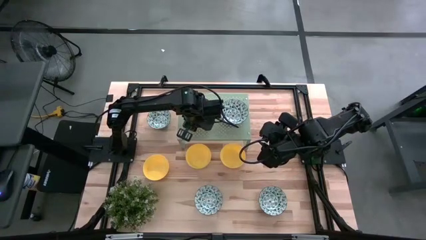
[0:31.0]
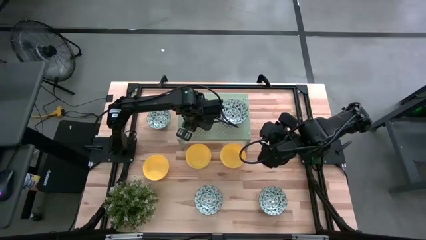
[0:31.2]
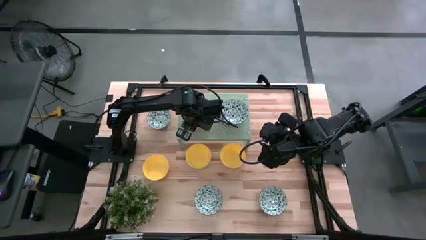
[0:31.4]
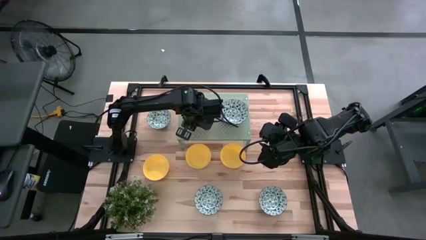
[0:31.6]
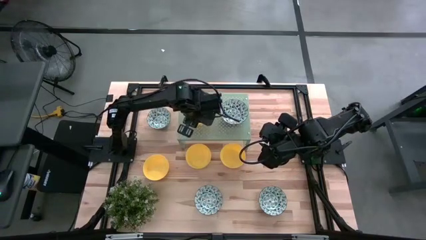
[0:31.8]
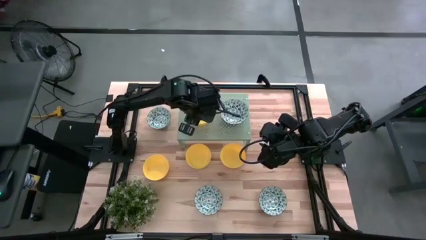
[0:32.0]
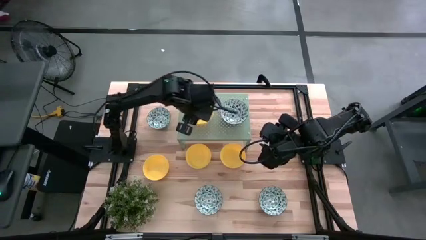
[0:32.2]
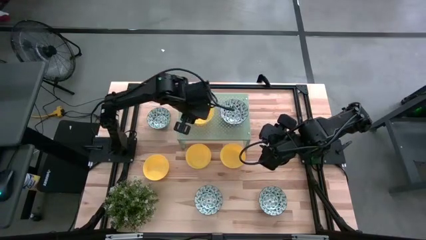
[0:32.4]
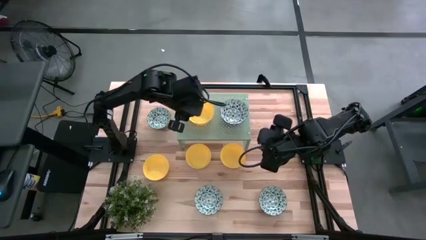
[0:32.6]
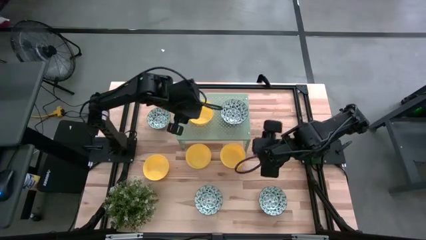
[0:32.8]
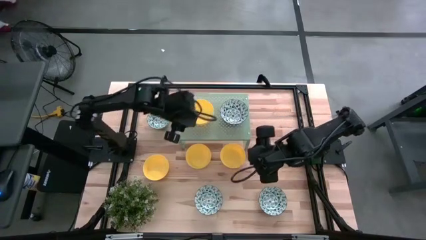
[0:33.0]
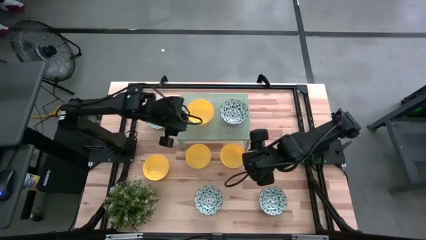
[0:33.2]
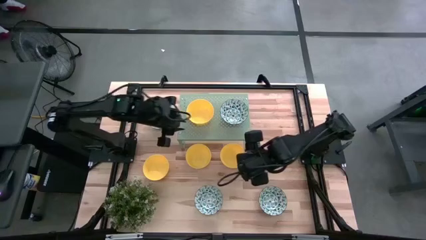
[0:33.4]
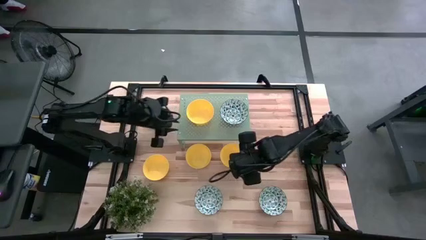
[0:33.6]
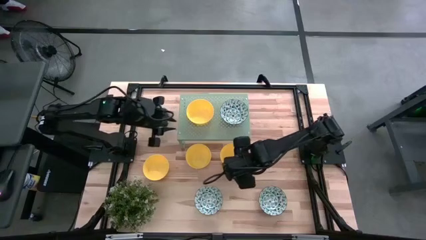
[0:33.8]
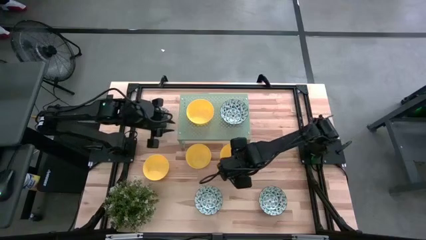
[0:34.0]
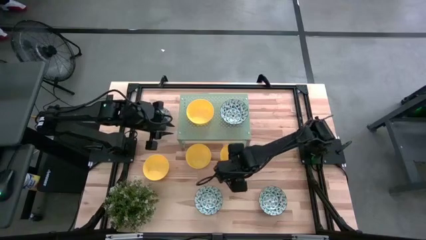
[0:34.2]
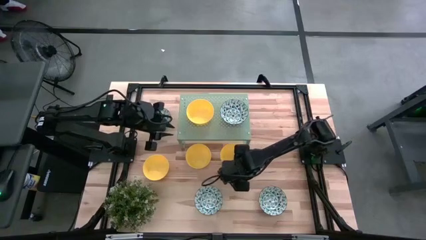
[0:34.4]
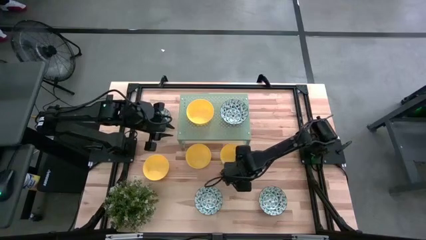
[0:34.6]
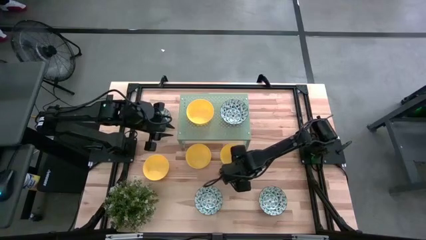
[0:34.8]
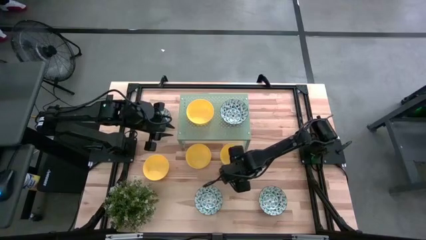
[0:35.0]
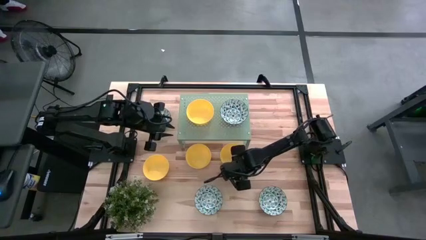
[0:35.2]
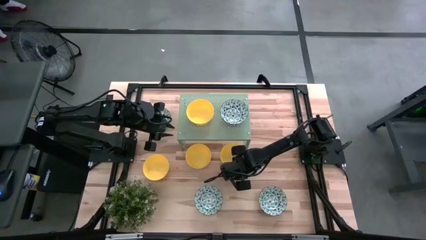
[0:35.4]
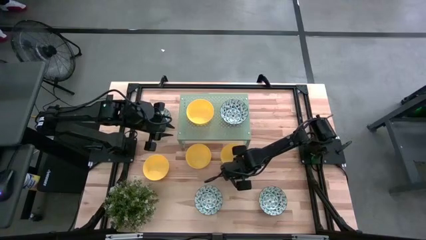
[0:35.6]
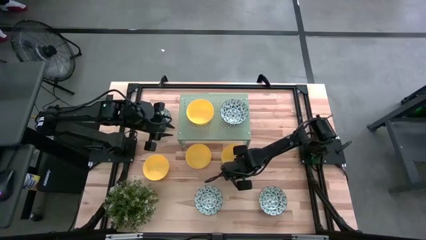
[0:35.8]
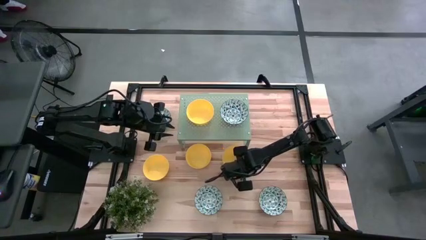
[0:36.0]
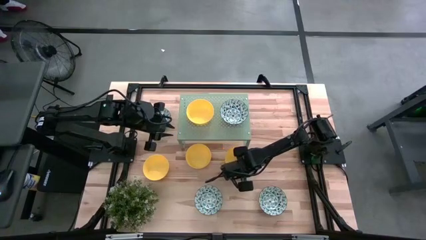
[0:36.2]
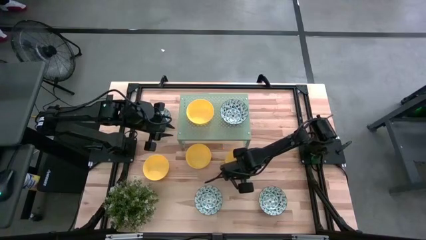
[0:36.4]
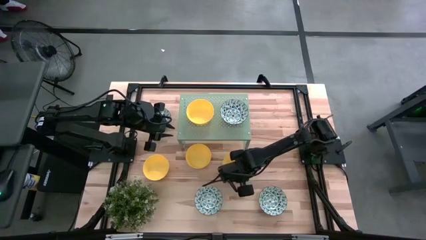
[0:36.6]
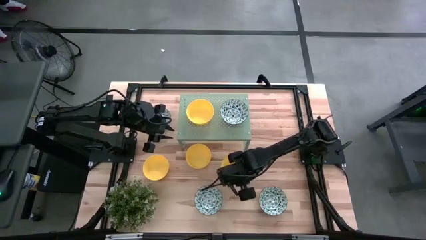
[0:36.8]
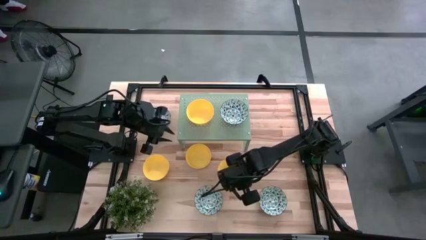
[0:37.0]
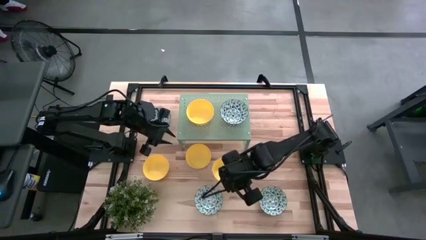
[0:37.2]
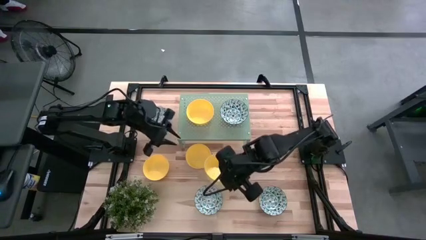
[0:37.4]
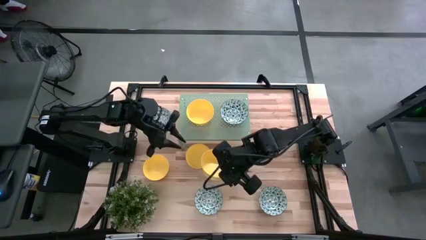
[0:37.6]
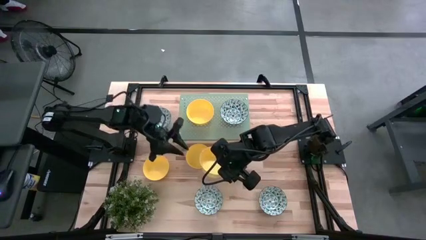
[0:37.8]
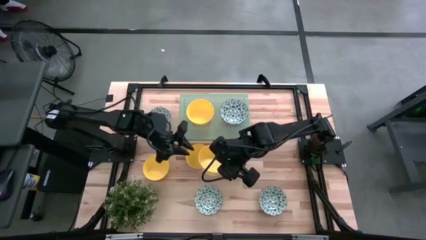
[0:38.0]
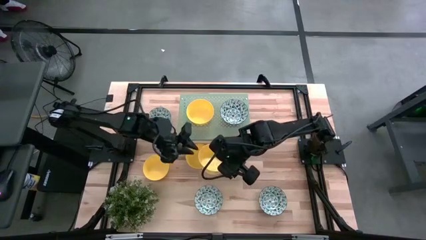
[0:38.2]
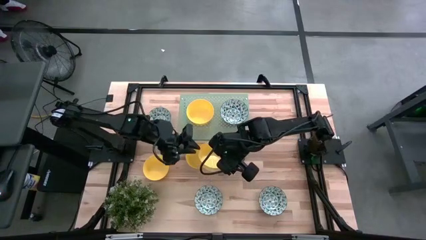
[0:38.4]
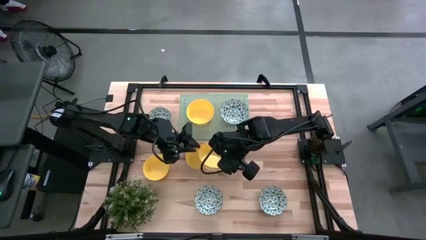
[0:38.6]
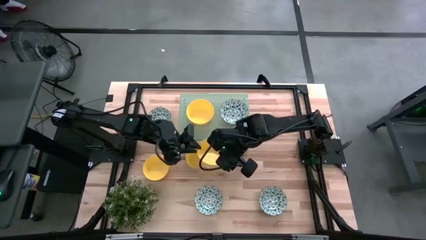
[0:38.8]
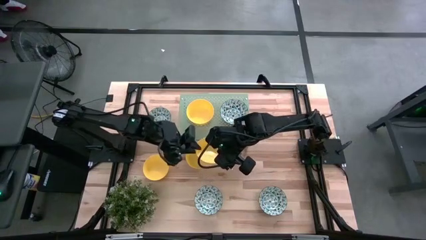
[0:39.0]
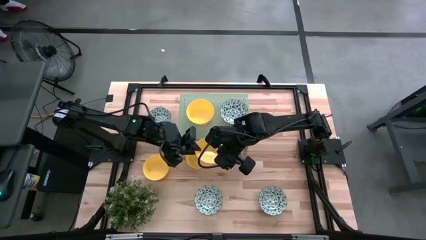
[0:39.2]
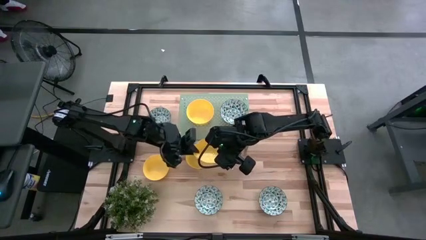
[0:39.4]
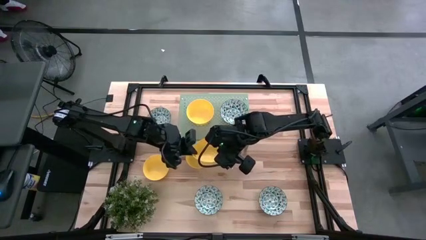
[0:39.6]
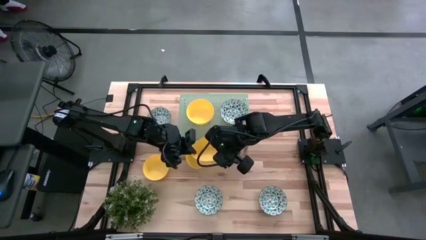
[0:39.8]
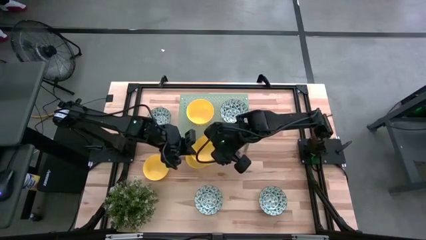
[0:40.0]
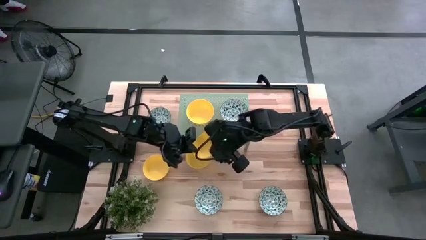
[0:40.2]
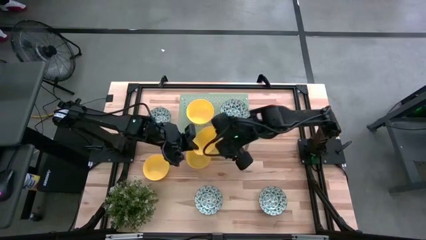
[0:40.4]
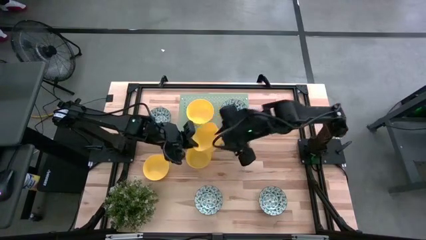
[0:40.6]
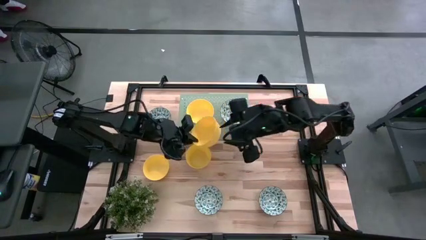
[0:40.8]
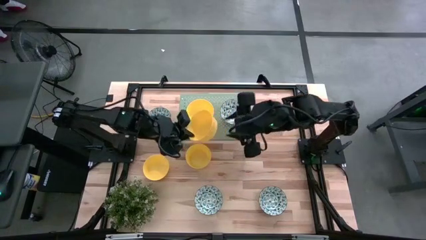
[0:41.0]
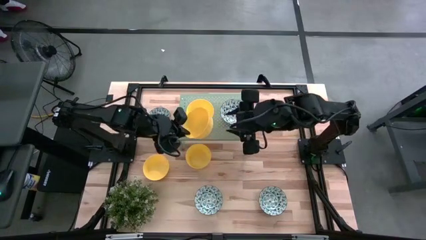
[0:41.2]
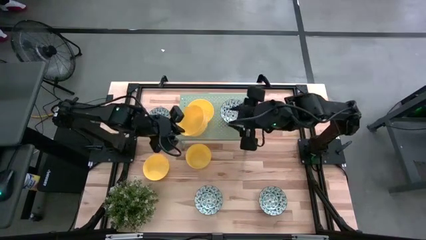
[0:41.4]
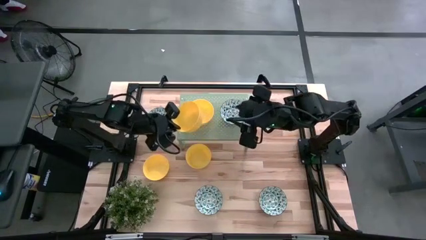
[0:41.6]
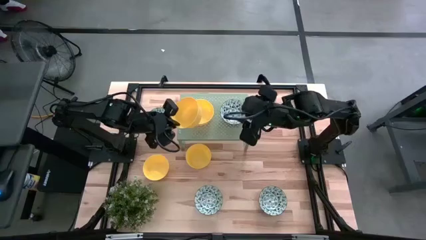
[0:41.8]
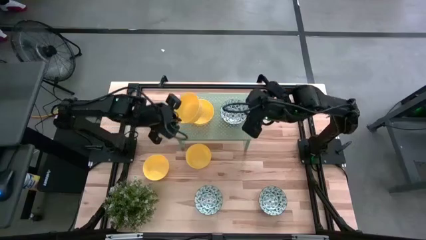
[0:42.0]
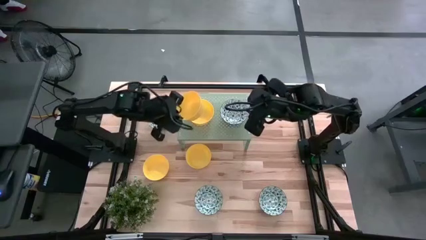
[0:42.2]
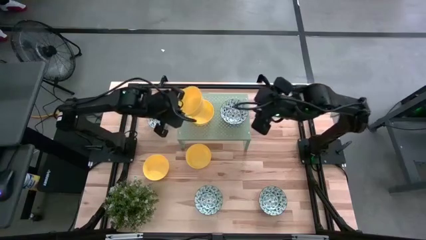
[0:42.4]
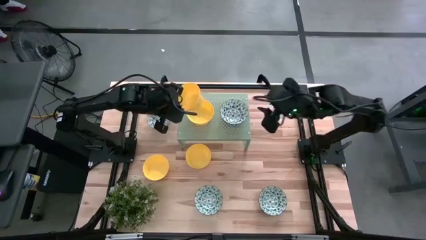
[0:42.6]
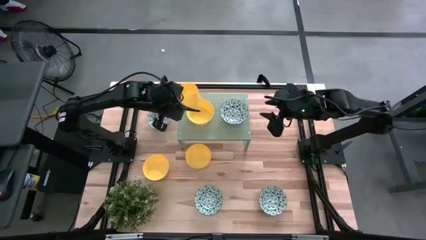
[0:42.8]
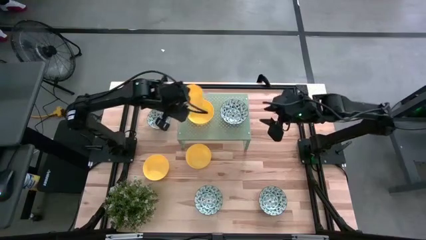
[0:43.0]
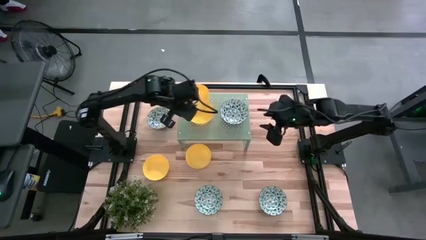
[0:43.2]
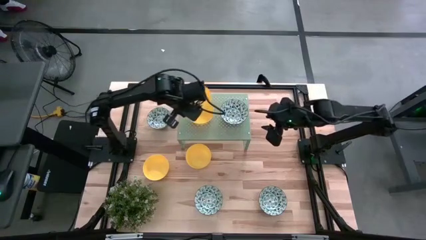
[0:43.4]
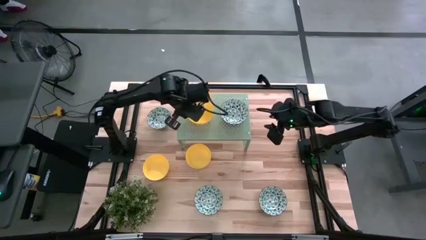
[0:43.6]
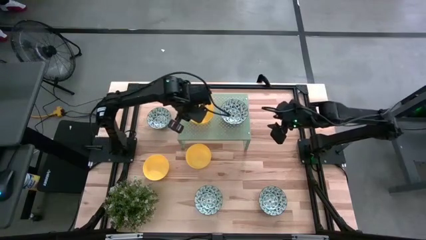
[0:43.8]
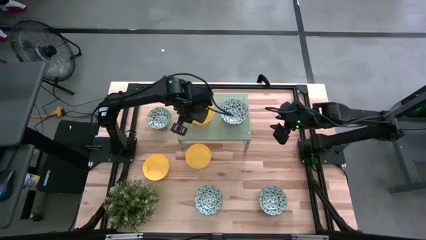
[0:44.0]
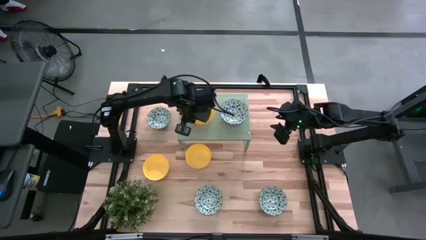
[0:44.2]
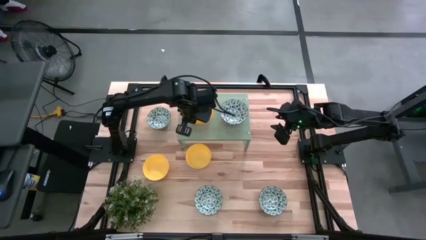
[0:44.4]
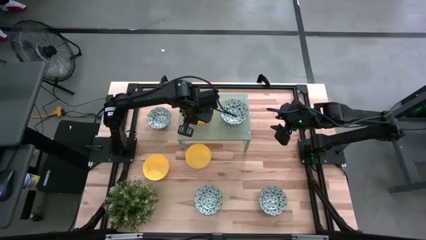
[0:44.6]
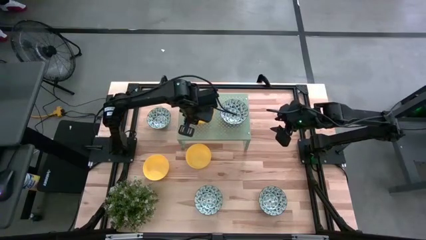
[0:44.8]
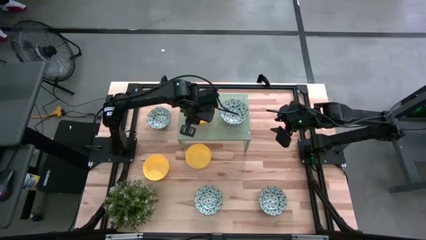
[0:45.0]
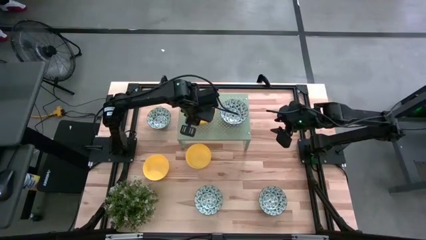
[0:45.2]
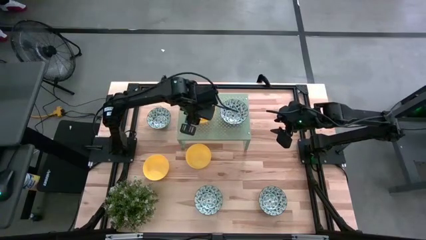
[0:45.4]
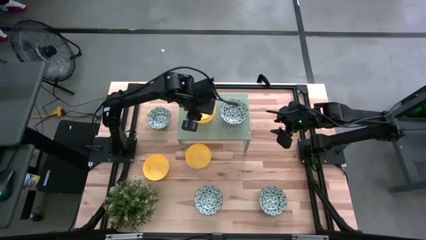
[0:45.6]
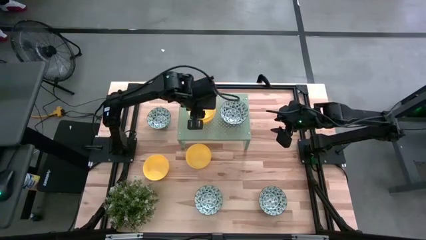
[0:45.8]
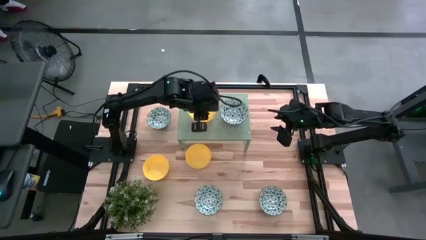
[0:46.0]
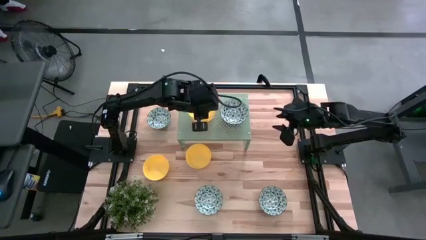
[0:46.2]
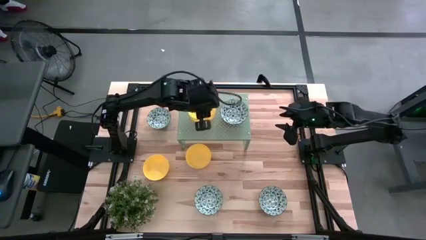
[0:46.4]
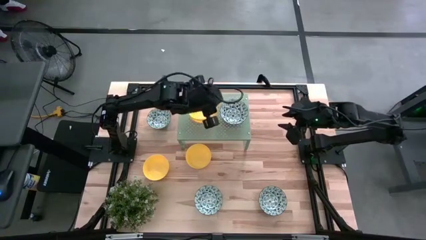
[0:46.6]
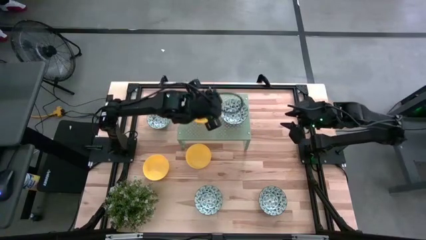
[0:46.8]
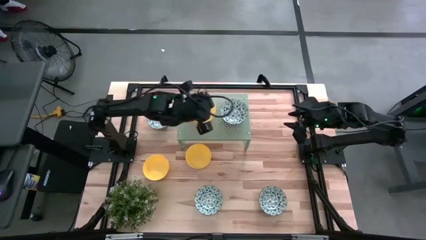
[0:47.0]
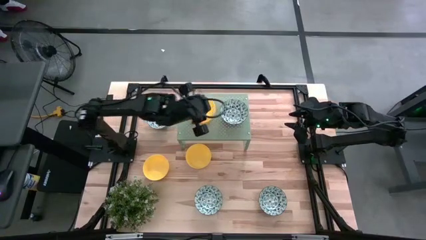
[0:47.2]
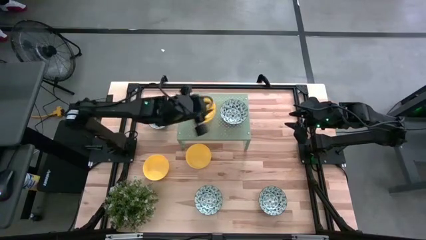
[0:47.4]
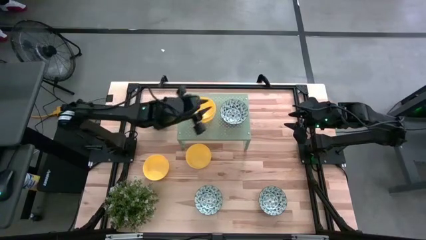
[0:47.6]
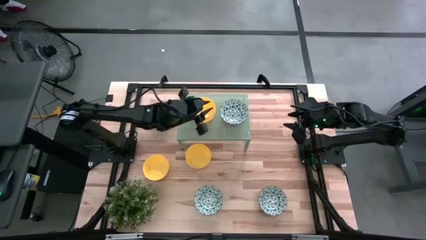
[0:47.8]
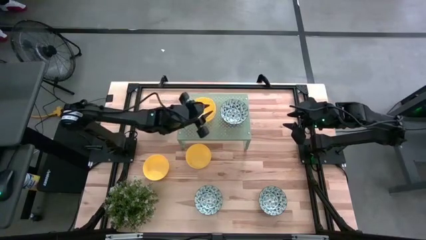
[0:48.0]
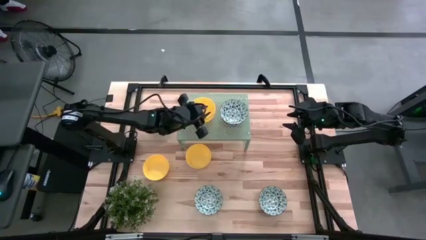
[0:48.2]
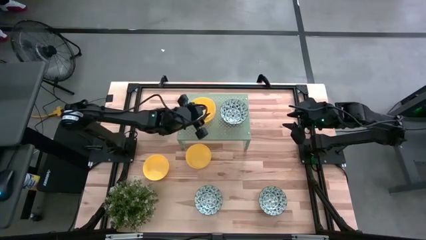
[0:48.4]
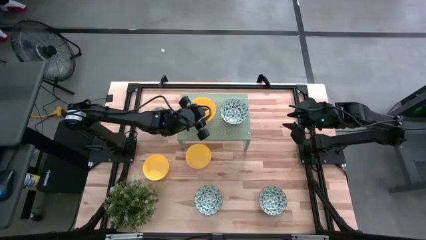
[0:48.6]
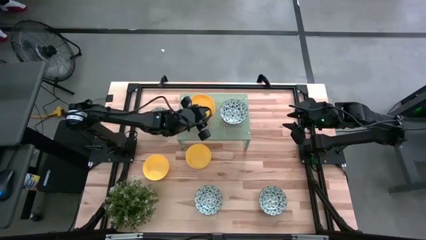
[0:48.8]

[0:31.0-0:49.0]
Task: Pick & Place Mini bowls
Stack the yellow bowl on top of the yellow bowl on the shelf
